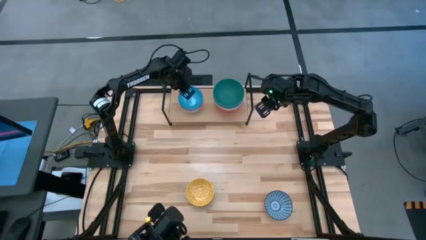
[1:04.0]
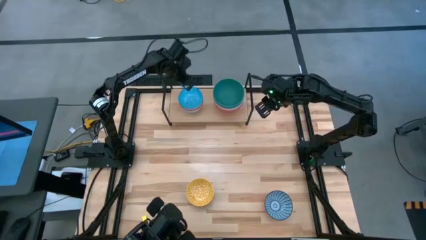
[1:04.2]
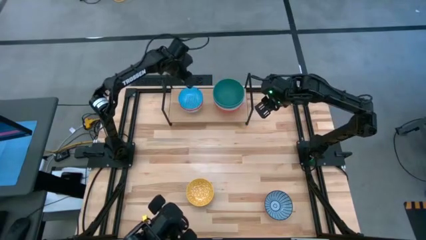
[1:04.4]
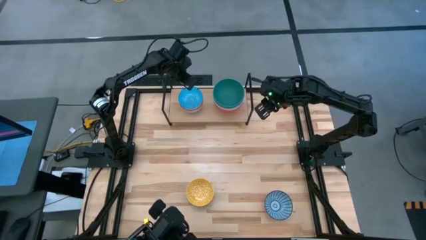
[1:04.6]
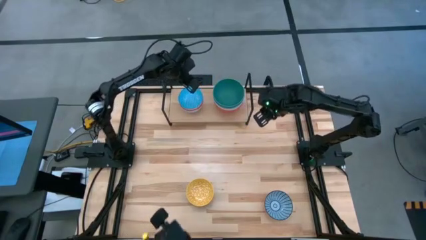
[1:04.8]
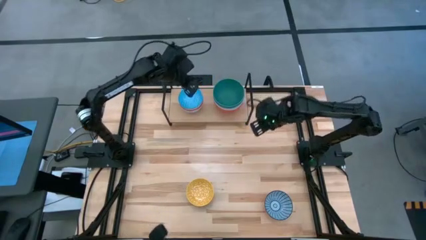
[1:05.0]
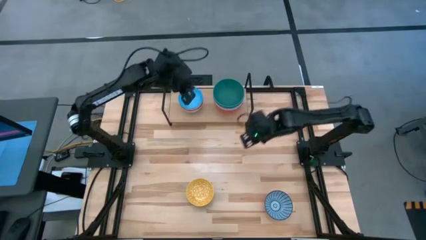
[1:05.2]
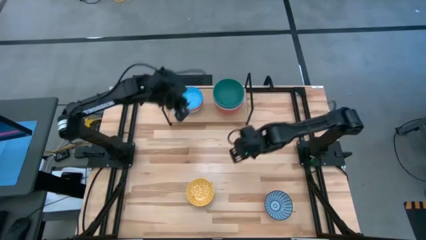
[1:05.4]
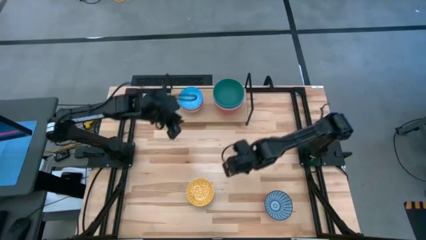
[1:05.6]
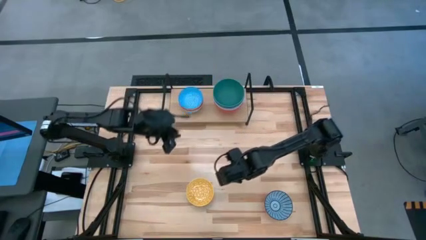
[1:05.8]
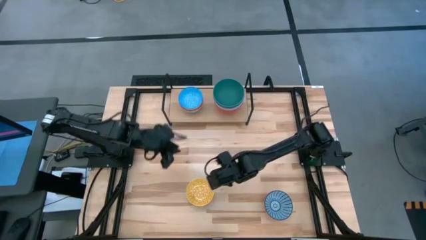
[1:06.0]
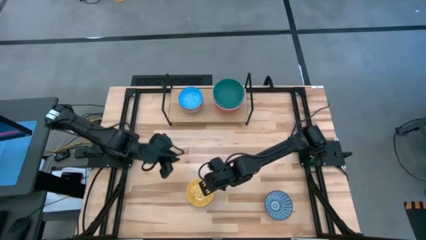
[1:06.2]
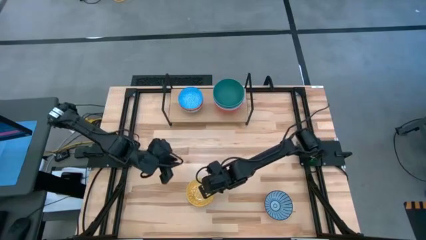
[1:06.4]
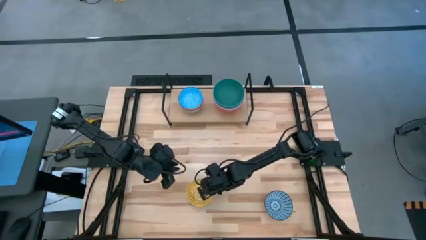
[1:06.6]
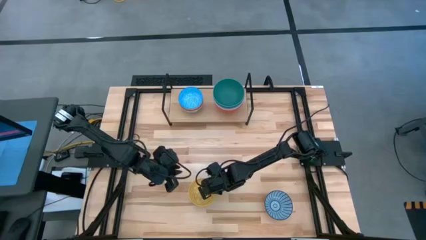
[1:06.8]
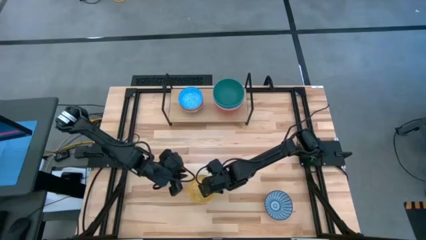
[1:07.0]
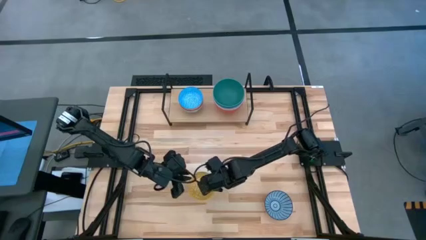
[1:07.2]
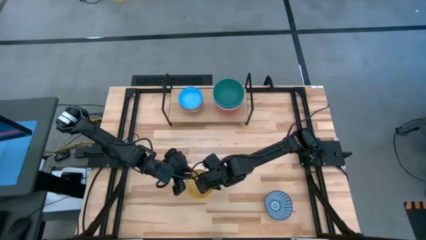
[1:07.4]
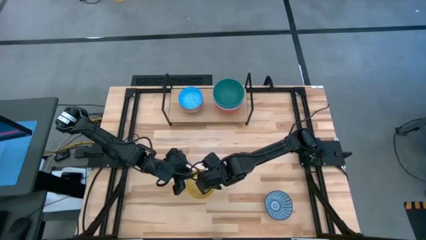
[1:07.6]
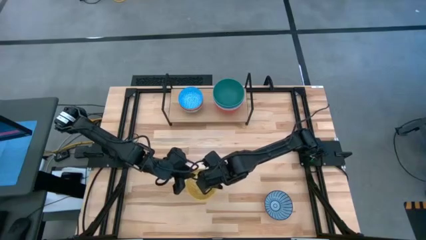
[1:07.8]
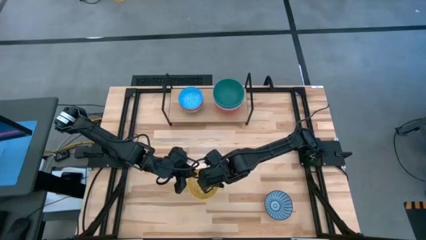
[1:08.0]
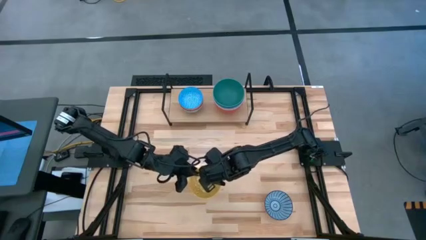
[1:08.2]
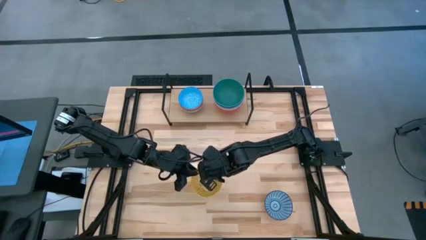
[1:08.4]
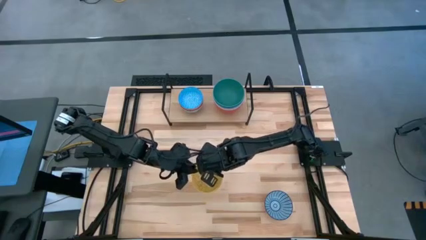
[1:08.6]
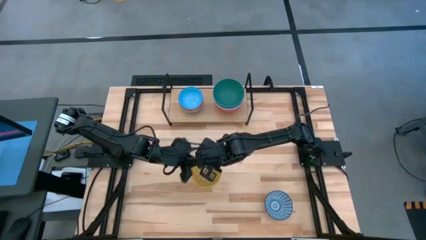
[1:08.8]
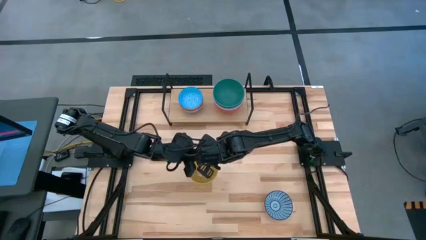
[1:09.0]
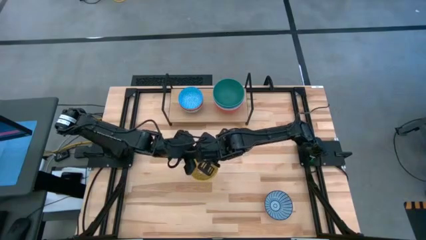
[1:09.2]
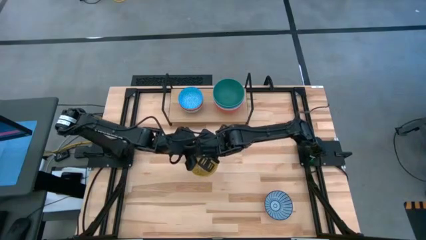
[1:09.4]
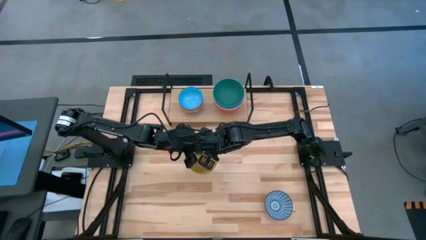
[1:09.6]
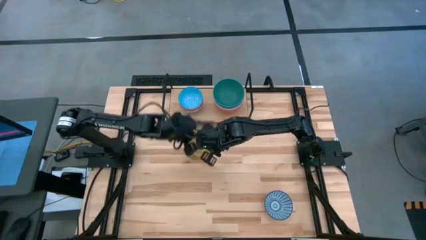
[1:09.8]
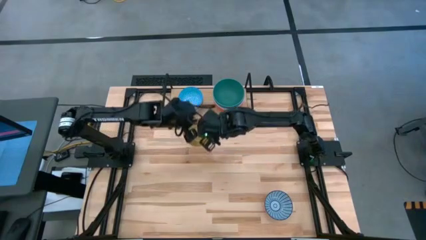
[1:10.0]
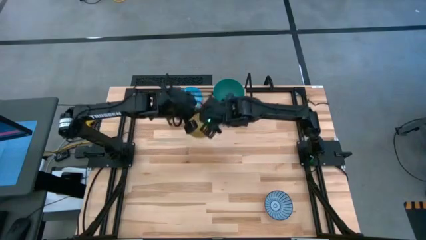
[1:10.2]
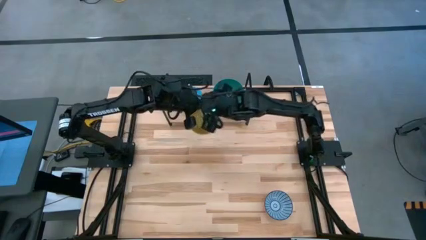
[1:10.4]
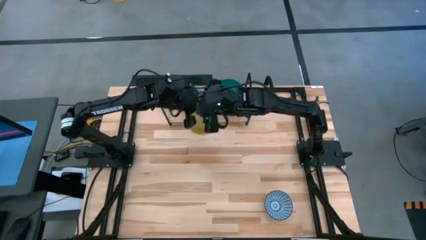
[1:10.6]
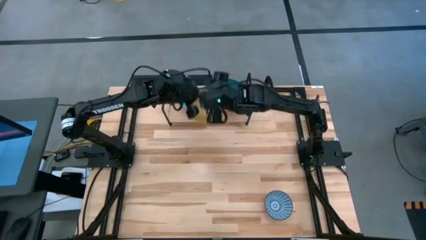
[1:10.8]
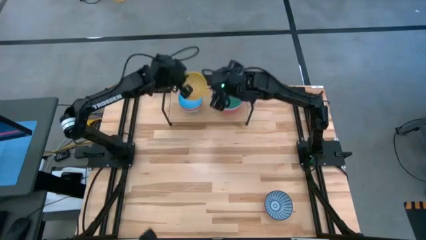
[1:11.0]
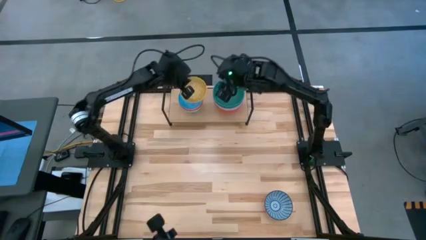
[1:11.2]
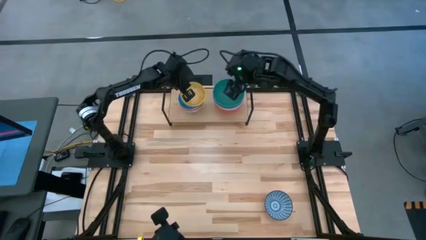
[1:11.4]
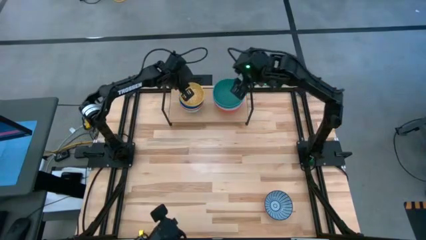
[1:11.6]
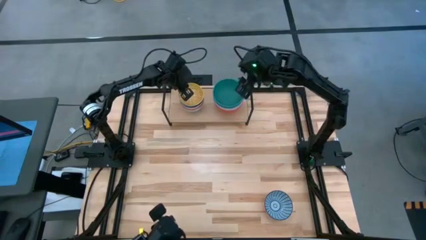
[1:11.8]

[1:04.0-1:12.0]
Task: Place and stack bowls onto a shelf
Stack the yellow patterned bowl on top of the light blue patterned bowl on the shelf

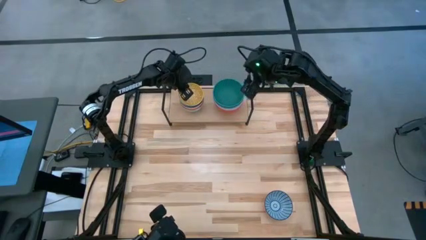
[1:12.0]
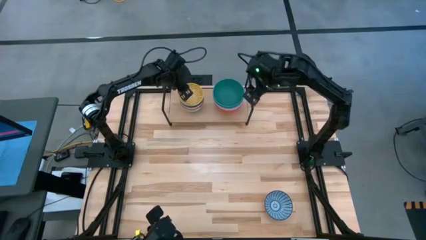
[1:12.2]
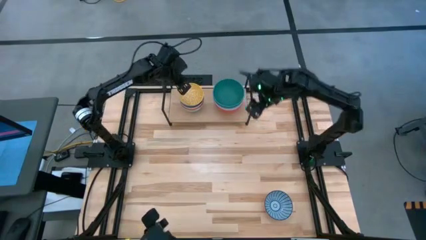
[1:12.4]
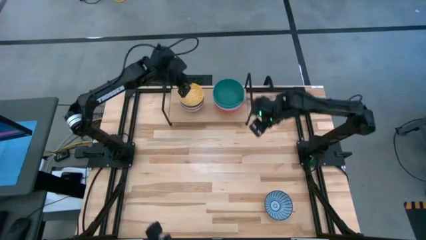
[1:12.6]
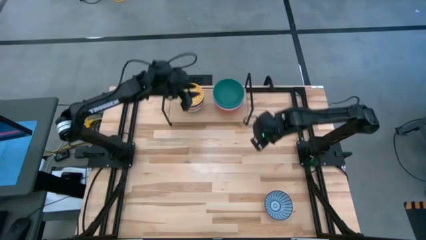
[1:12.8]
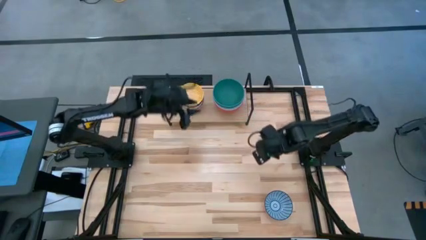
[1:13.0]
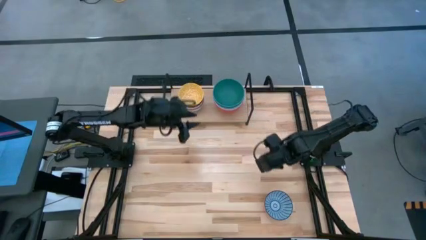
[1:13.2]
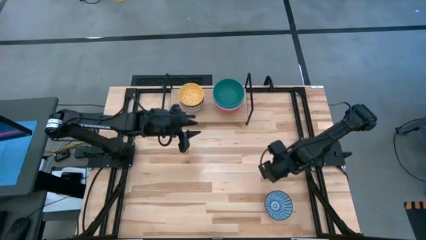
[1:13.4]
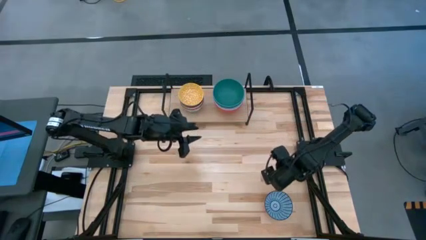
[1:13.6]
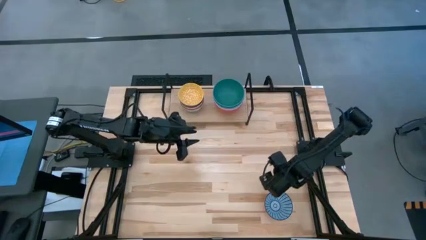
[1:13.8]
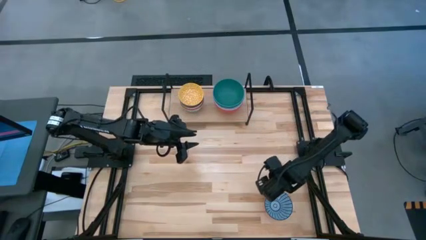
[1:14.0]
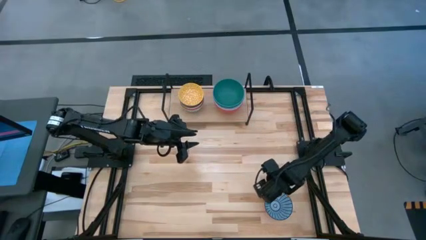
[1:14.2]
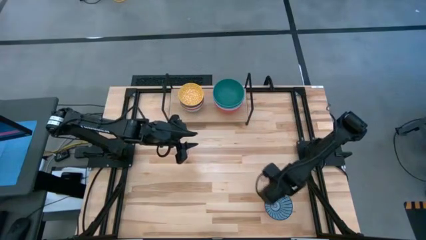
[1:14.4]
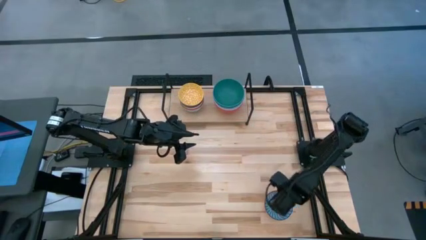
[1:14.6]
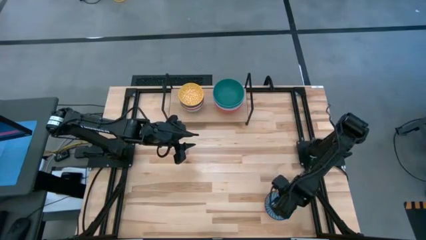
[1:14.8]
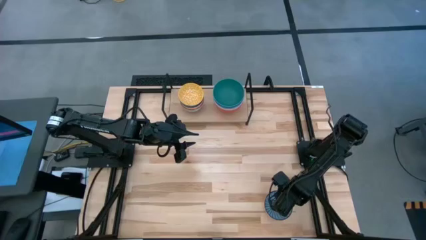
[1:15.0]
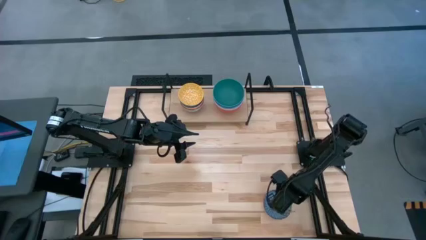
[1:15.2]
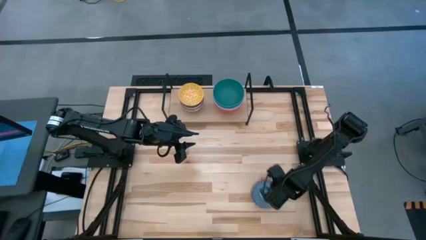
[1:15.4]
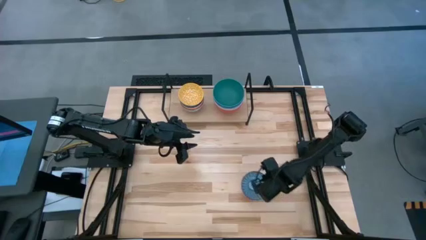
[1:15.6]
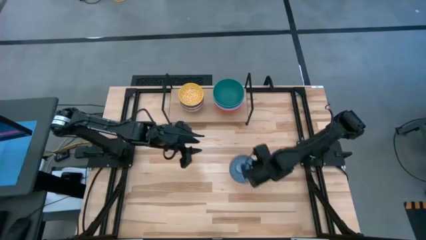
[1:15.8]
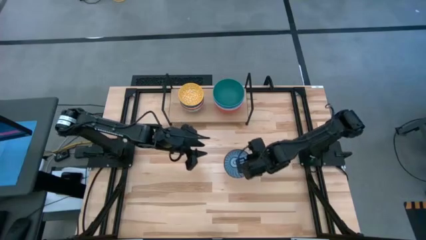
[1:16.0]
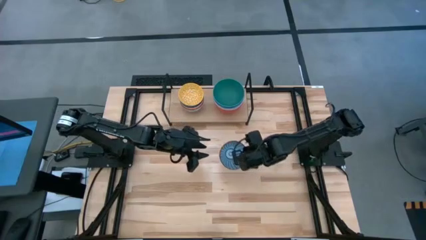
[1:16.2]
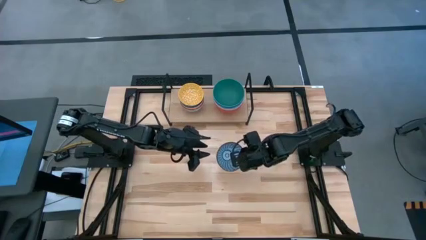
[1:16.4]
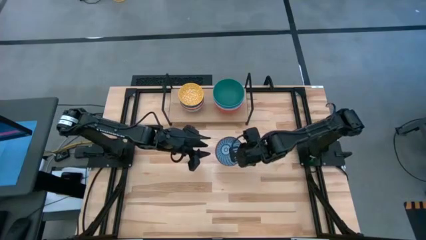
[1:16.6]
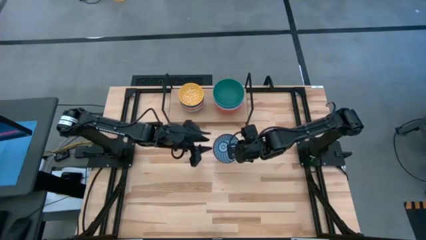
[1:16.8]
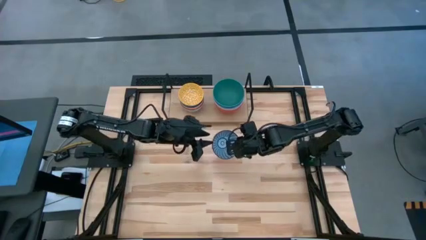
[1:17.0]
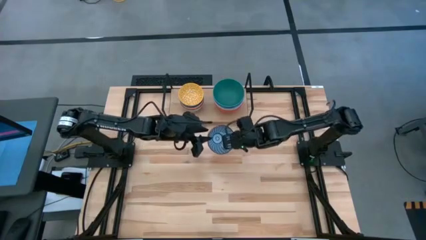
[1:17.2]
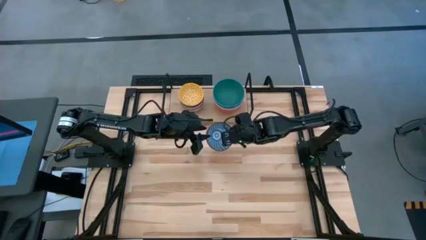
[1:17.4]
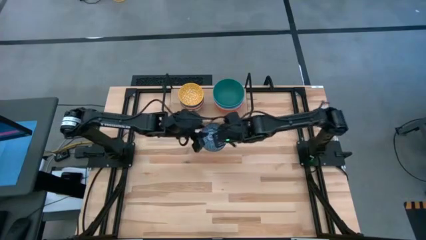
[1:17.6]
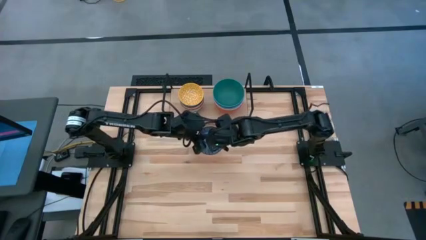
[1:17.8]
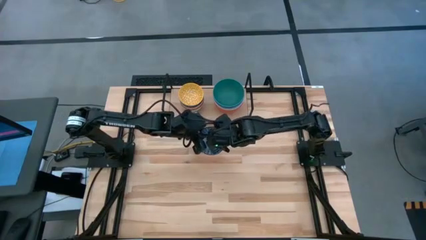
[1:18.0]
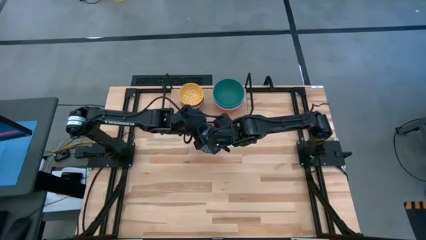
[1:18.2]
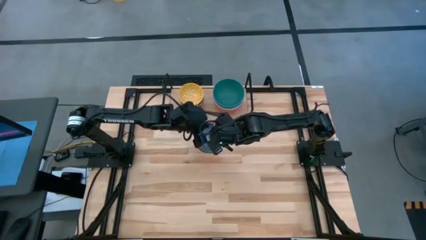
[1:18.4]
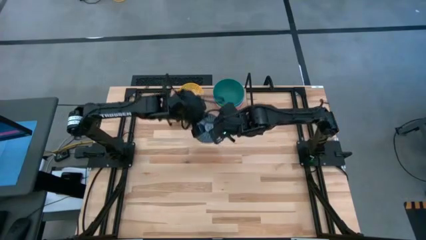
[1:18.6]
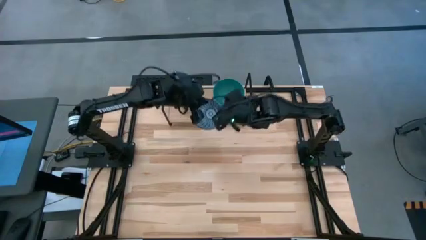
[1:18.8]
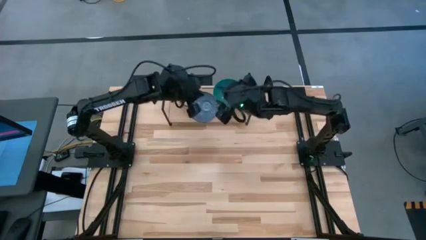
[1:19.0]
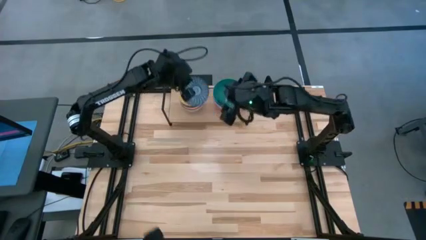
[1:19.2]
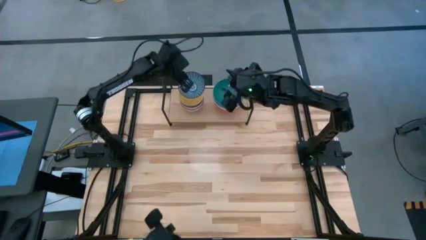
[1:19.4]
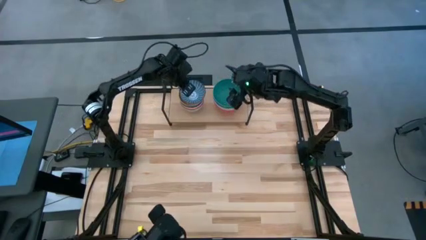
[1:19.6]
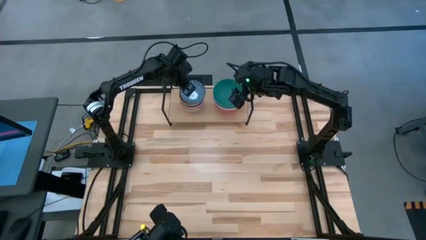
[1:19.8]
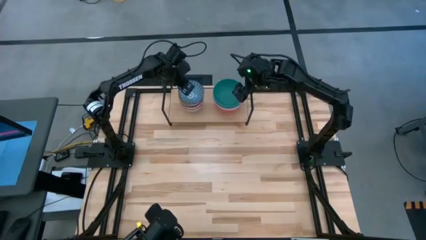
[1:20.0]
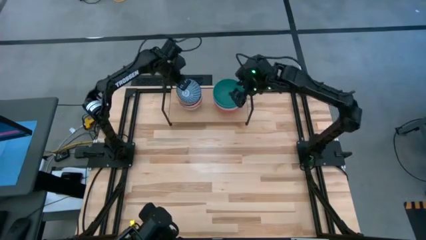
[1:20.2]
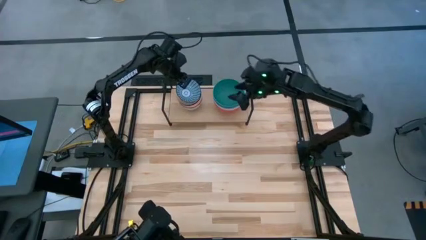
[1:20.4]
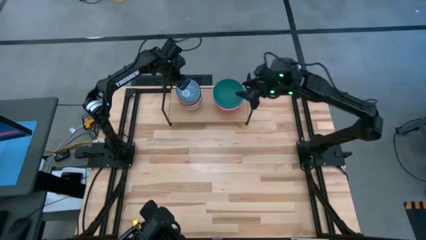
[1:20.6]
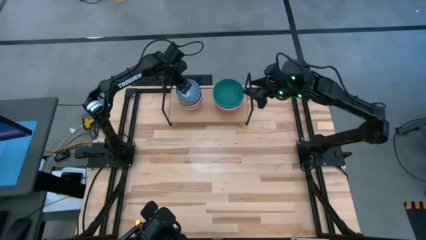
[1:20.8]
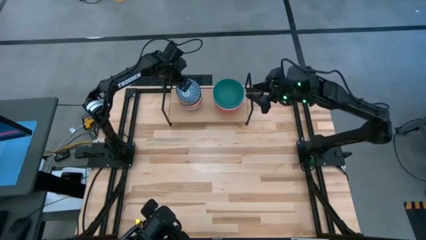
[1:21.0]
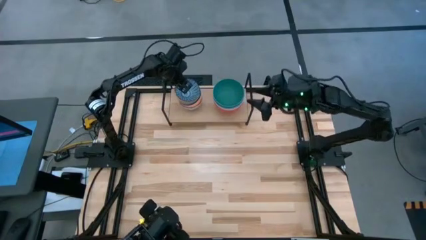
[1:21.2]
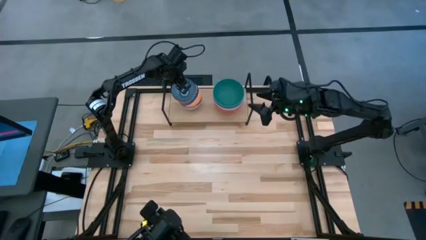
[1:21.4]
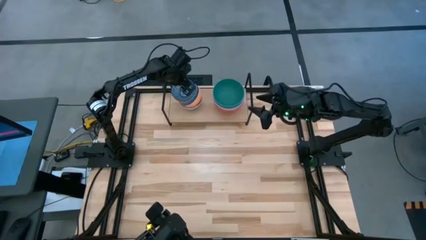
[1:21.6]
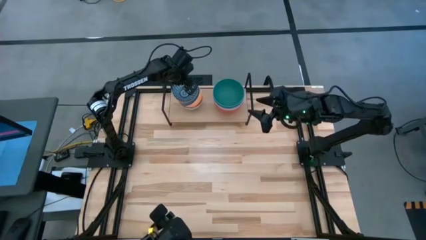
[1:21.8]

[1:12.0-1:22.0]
Stack the blue patterned bowl on top of the yellow patterned bowl on the shelf
